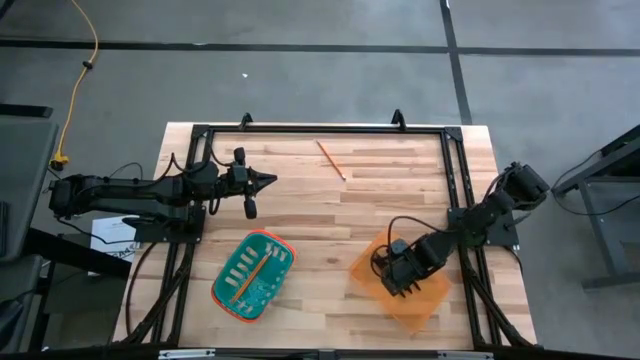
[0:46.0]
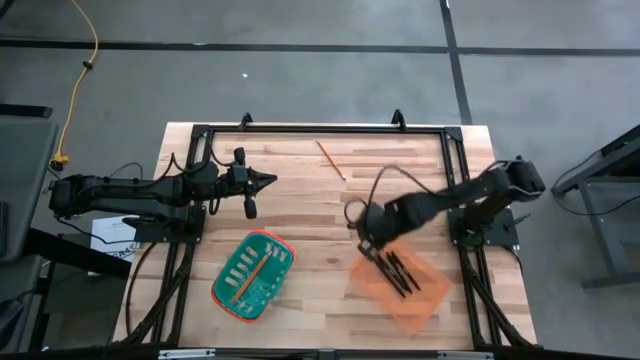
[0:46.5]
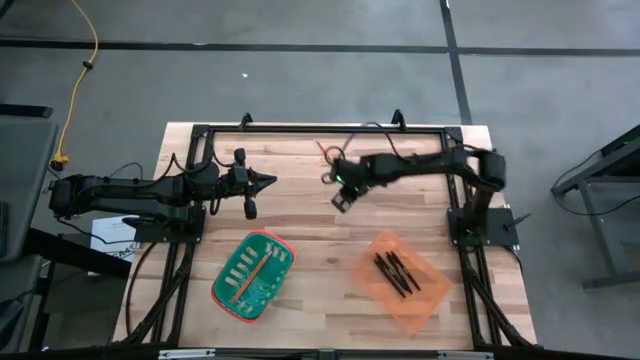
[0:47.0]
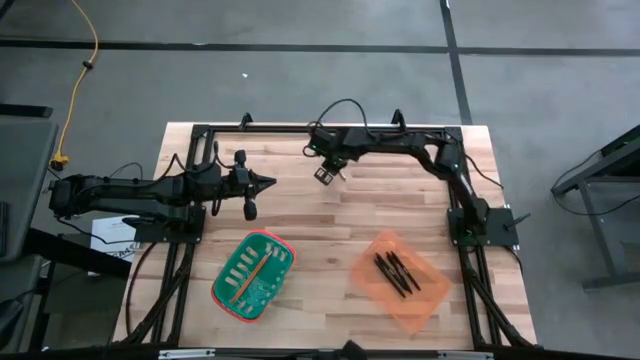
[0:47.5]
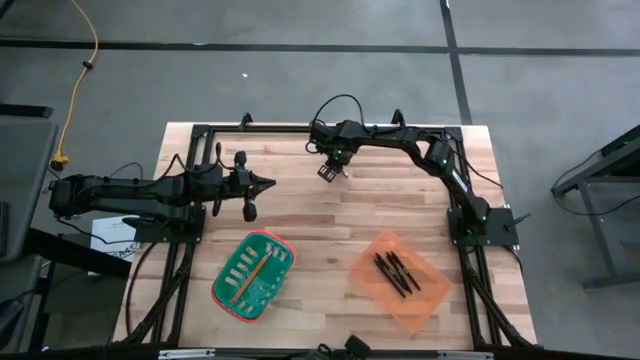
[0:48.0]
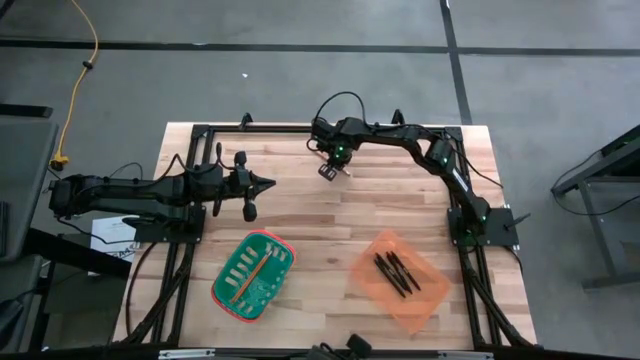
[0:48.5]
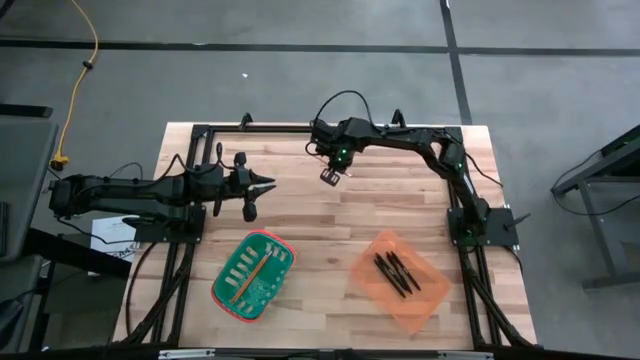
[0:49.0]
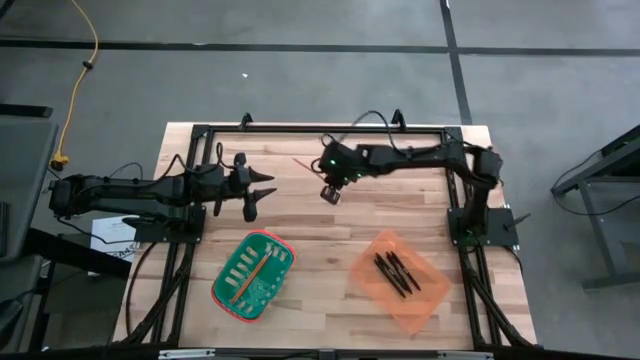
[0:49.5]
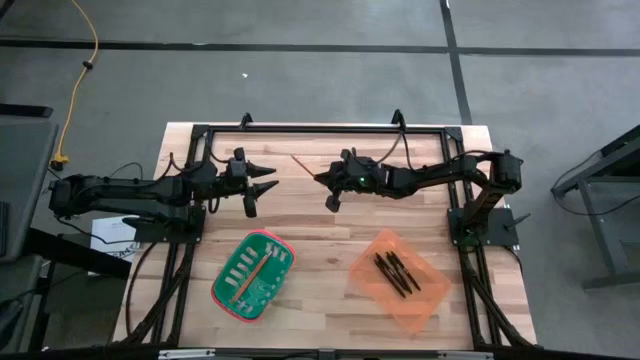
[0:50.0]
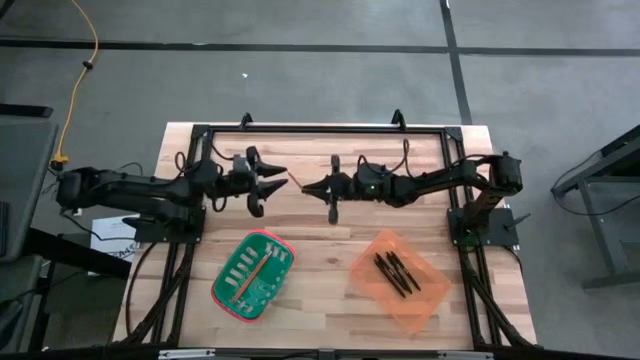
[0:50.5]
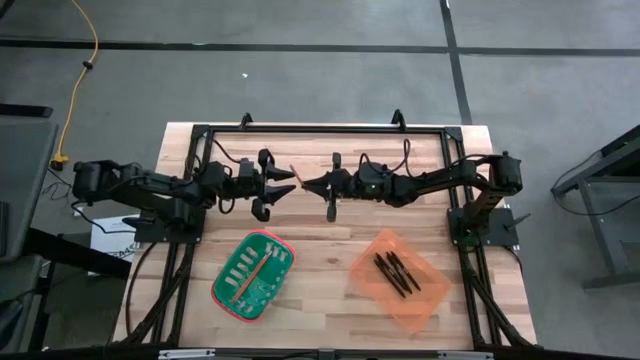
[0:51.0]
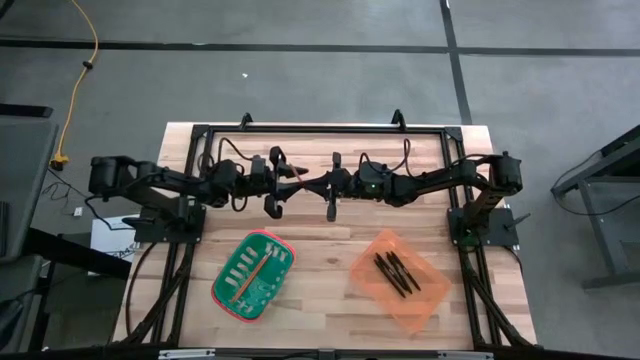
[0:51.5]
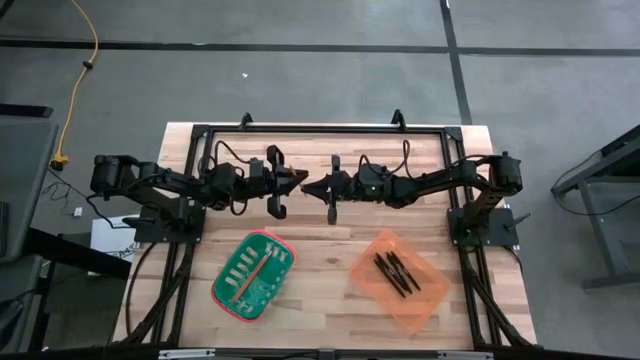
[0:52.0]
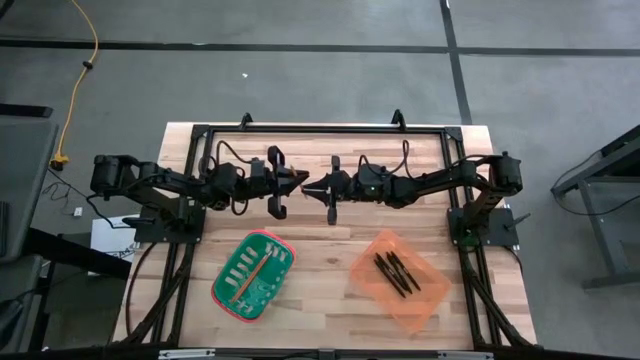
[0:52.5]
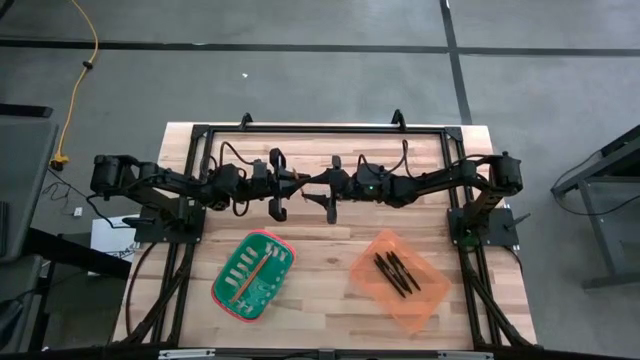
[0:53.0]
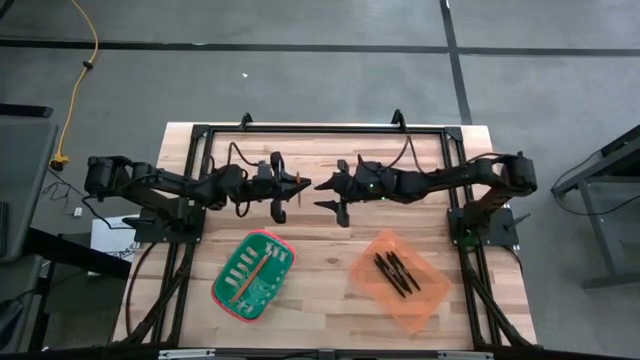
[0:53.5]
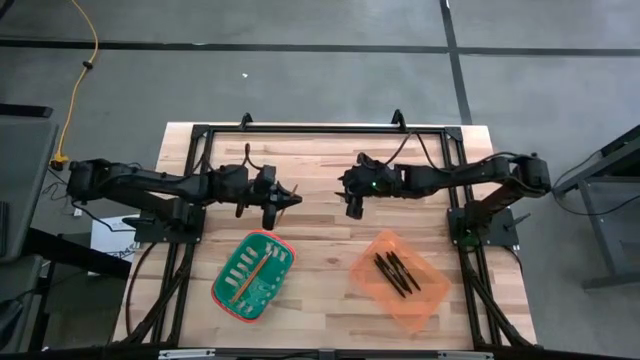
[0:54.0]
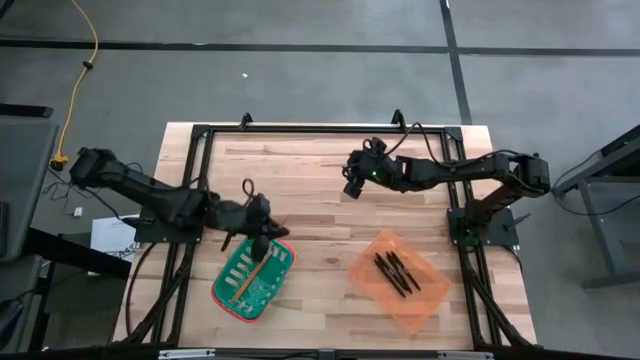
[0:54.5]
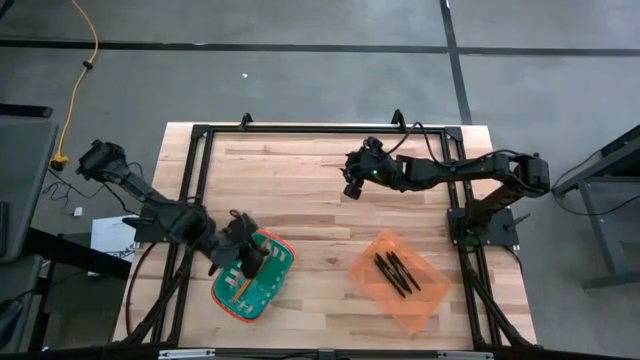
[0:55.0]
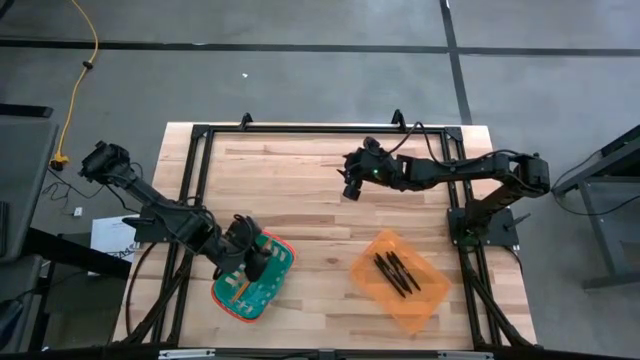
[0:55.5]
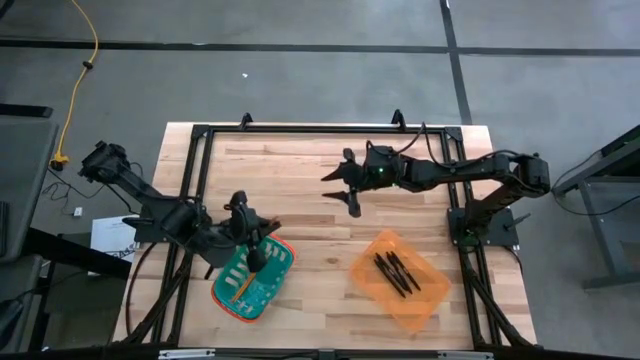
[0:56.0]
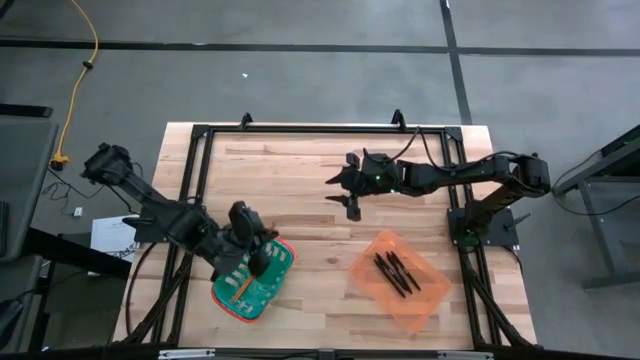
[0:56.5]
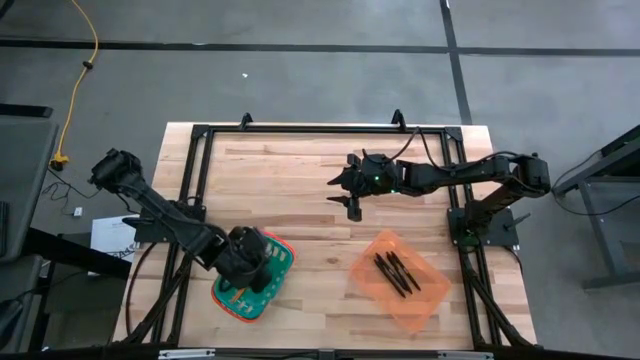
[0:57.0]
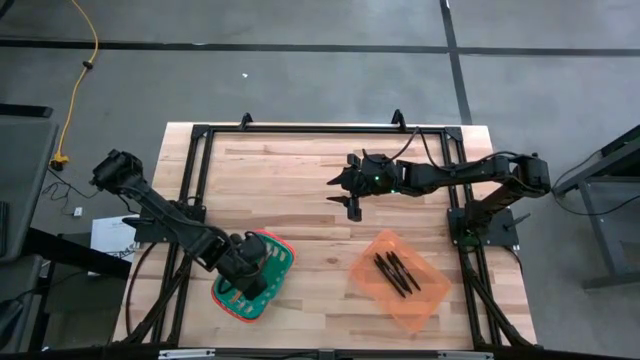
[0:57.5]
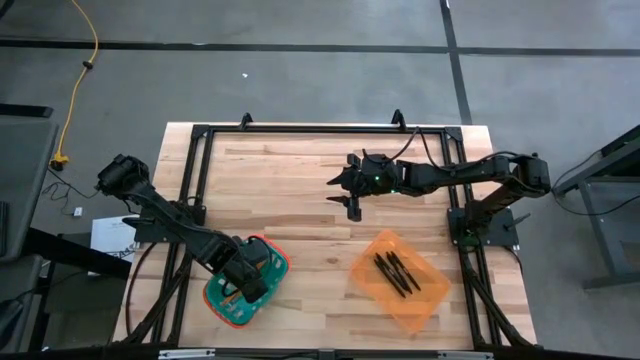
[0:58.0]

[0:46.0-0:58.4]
Task: Sort pens & pencils
Put the yellow pencil into the green bin

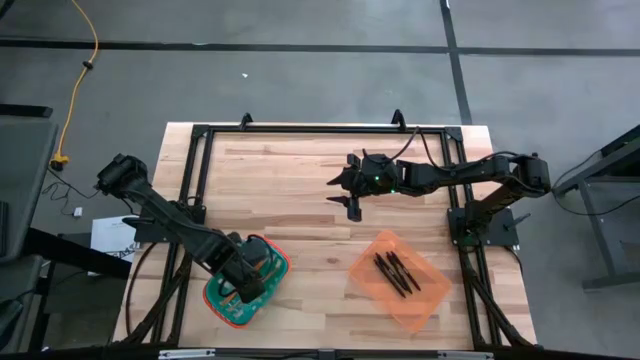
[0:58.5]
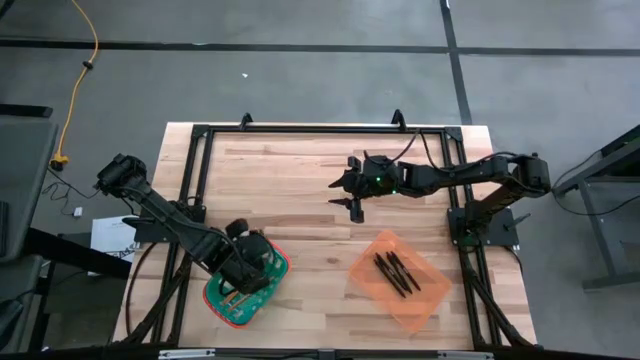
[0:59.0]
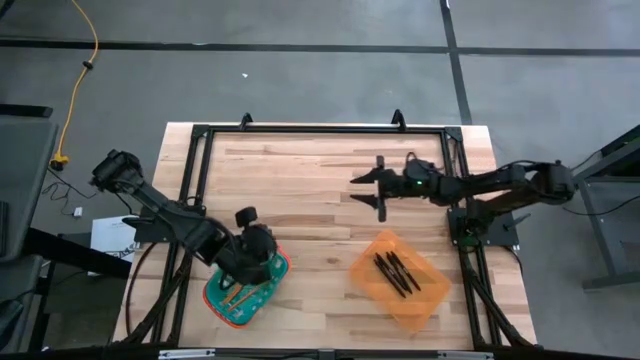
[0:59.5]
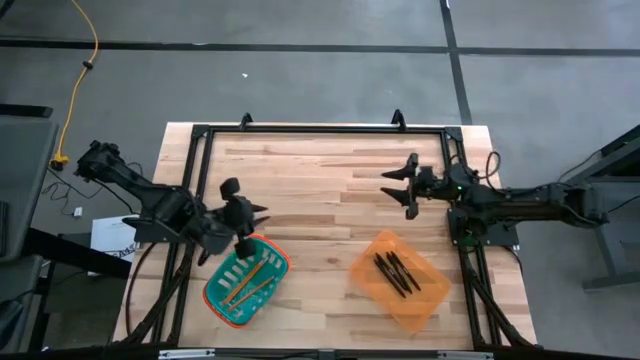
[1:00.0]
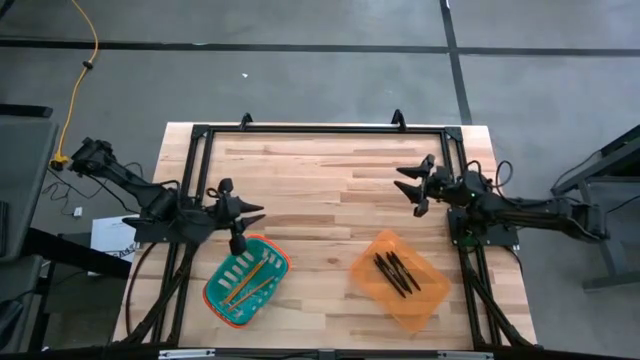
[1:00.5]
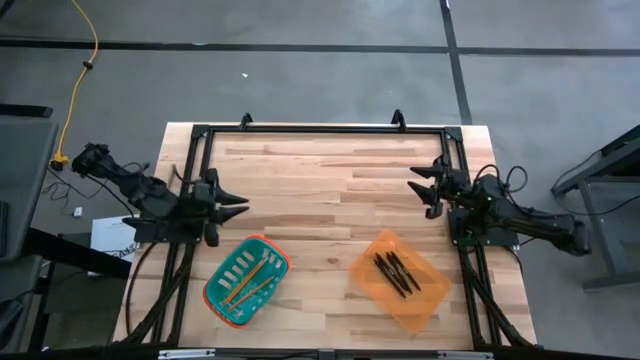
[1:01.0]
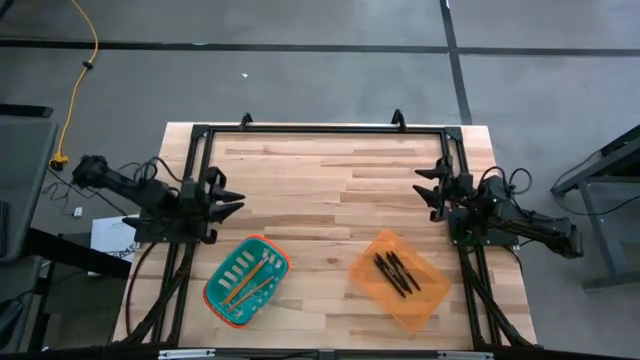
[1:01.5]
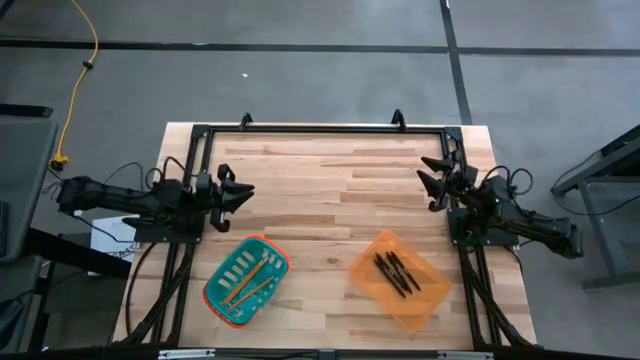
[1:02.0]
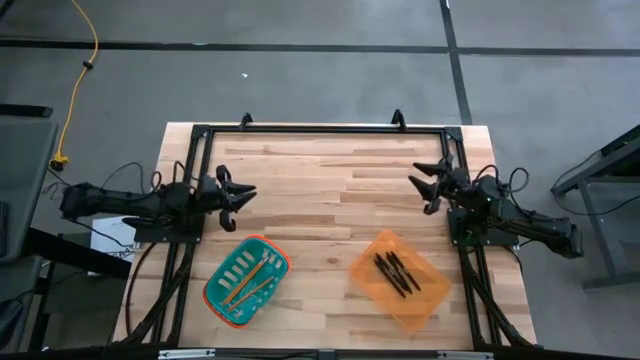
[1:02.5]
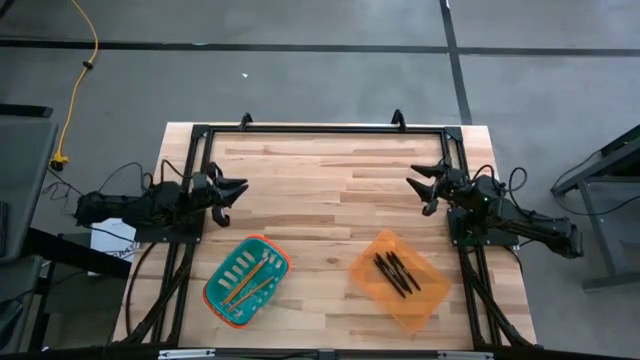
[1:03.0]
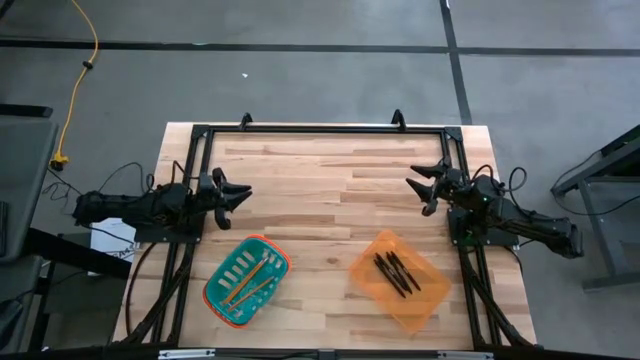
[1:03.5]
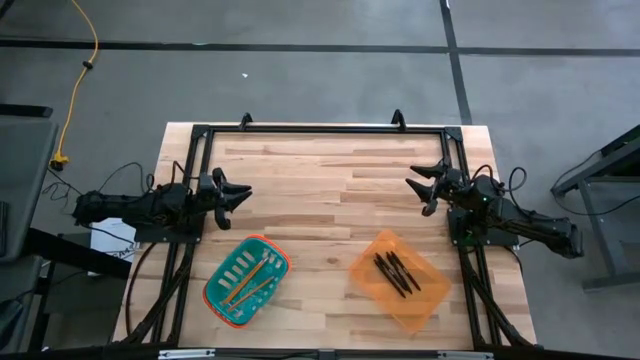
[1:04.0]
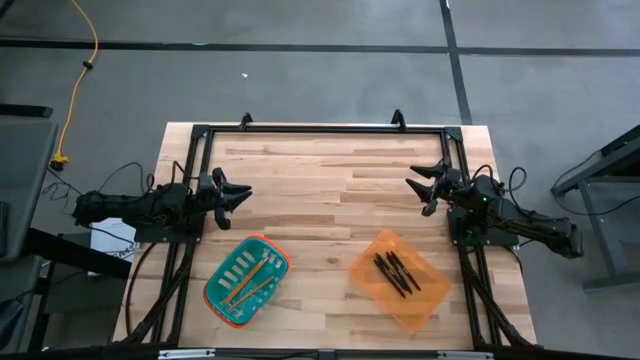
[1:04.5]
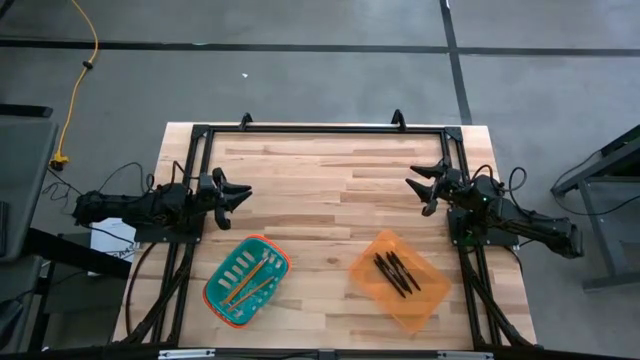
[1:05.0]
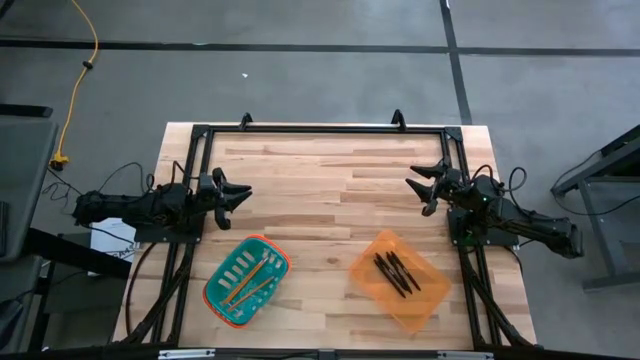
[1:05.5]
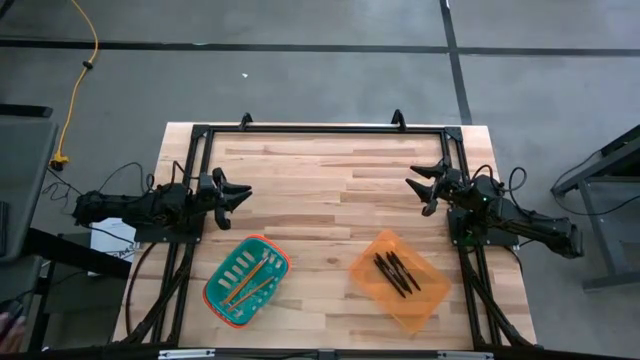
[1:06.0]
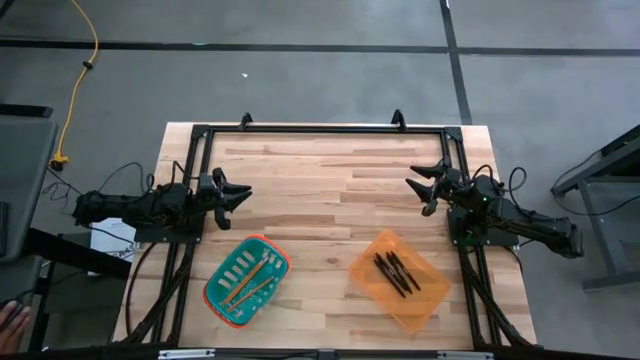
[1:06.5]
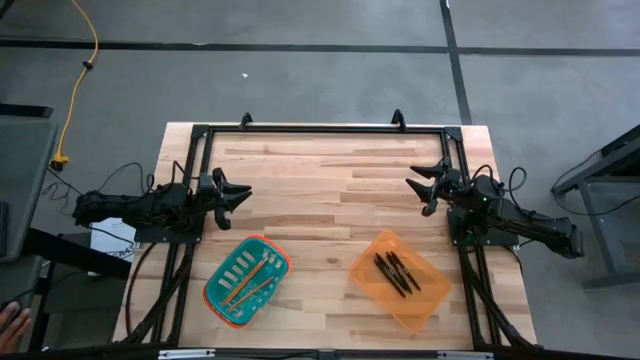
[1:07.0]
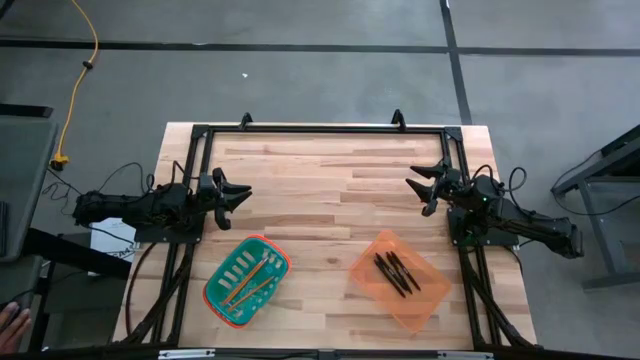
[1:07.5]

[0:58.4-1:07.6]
Return to Home Position
